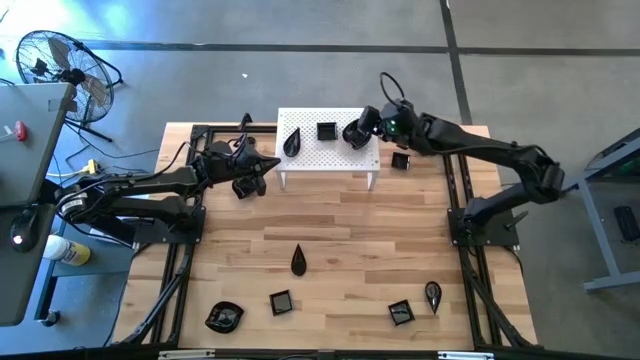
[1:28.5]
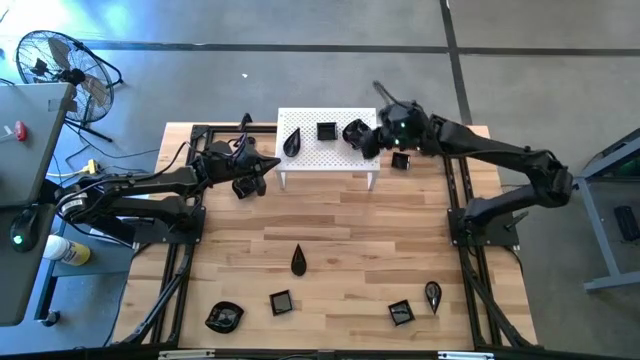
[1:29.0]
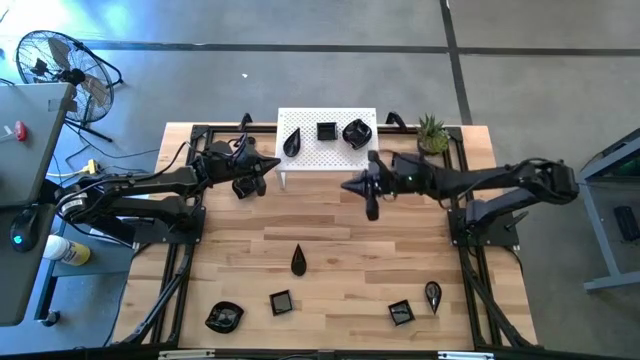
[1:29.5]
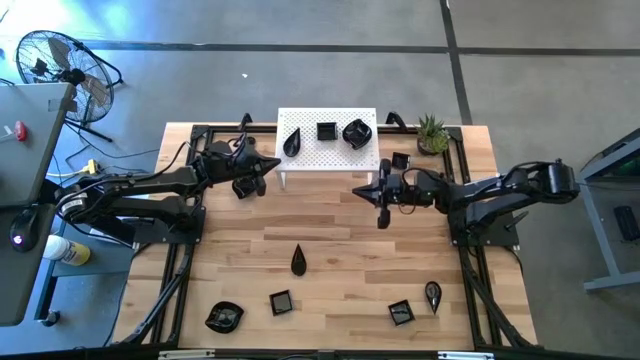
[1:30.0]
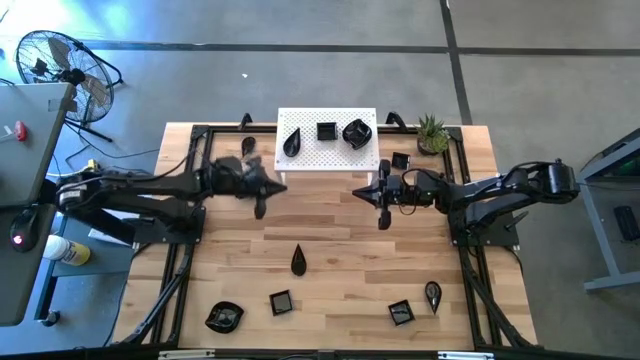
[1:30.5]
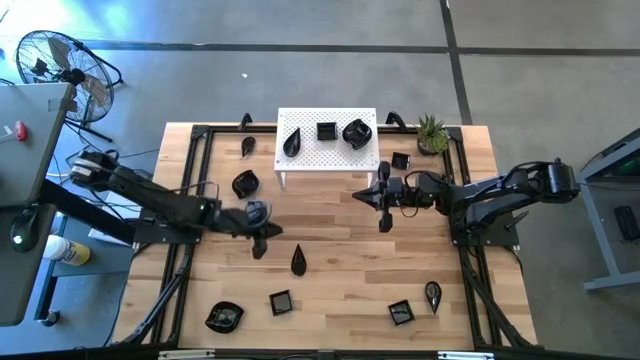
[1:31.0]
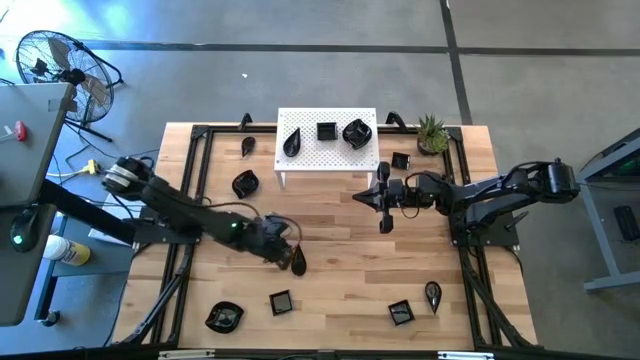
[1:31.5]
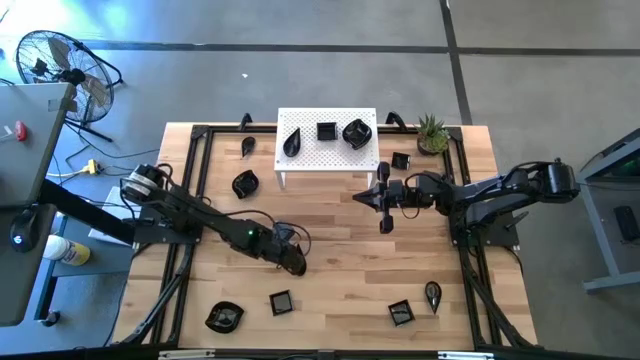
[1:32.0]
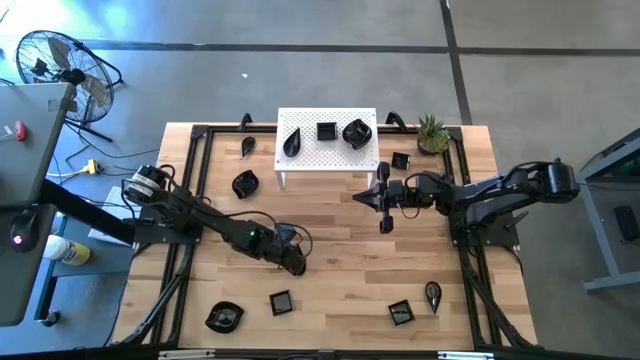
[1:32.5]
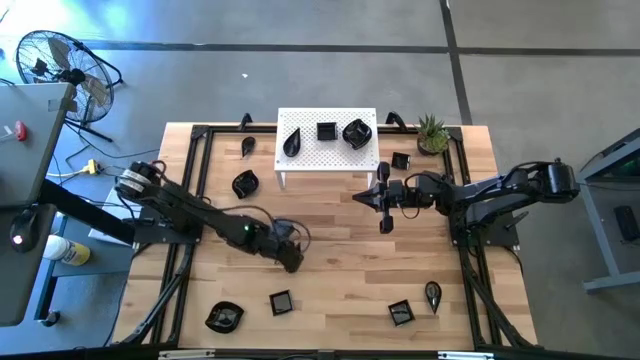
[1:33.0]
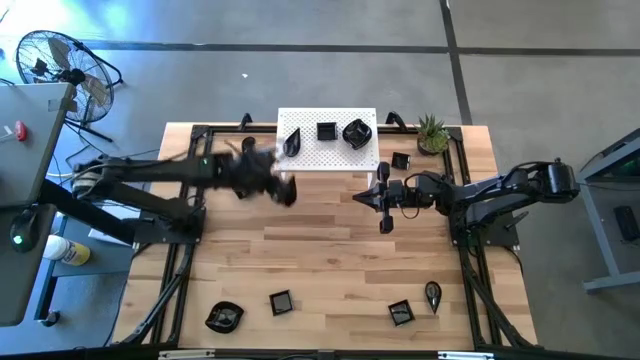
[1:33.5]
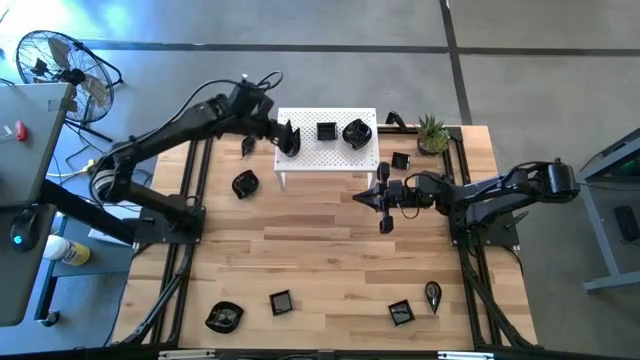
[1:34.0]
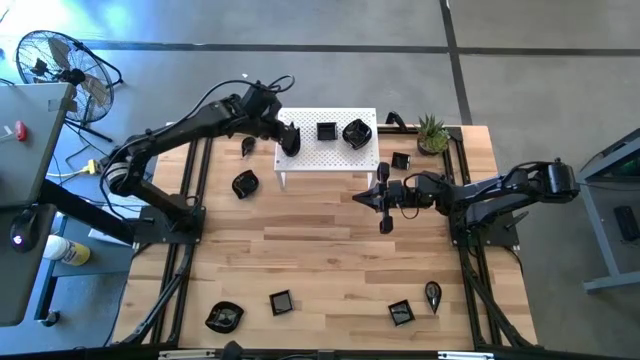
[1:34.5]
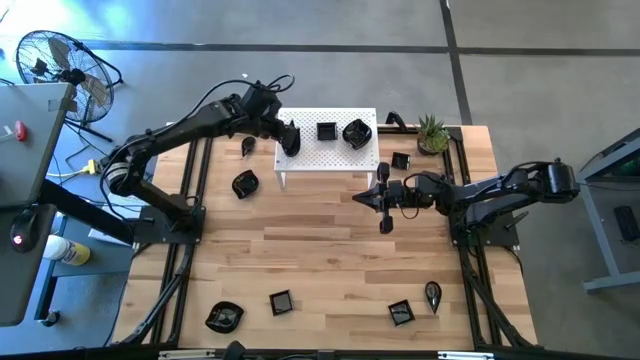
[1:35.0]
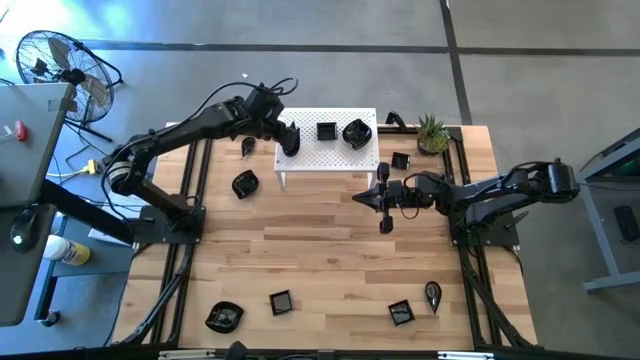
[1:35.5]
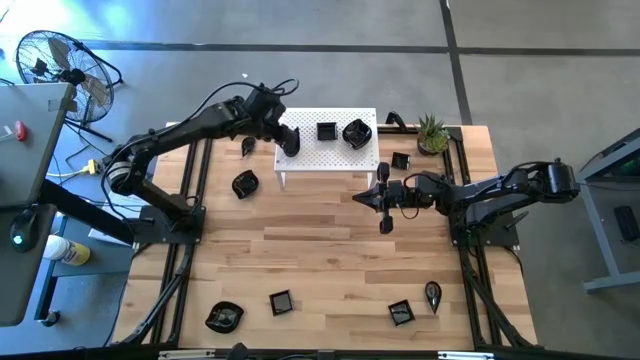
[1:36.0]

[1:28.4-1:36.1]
Task: Pick & Place Mini shaped plates
Stack the drop shaped bowl on top of the drop shaped bowls on the shelf

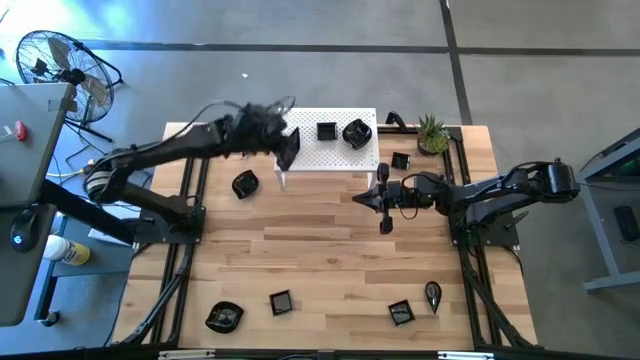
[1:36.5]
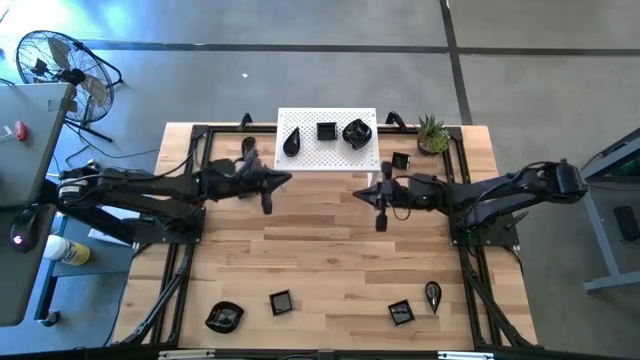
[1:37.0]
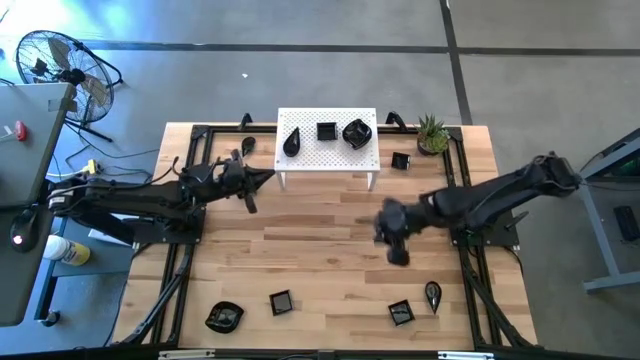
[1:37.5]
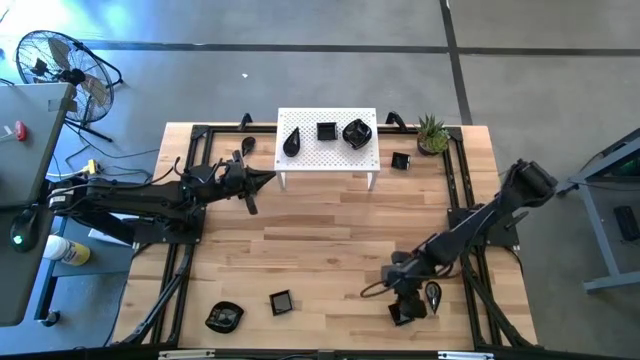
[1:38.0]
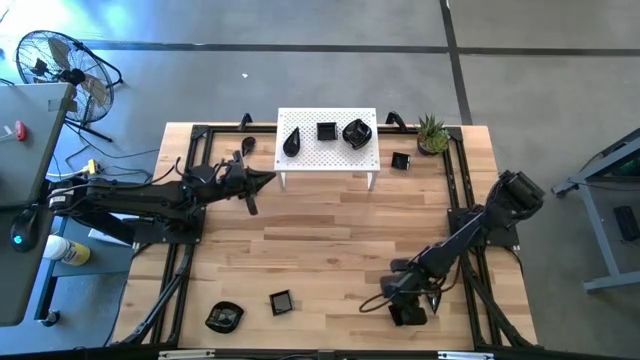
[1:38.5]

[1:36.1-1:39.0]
Stack the square bowl on top of the square bowls on the shelf

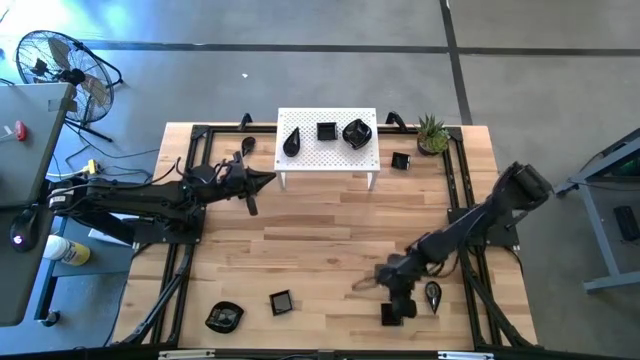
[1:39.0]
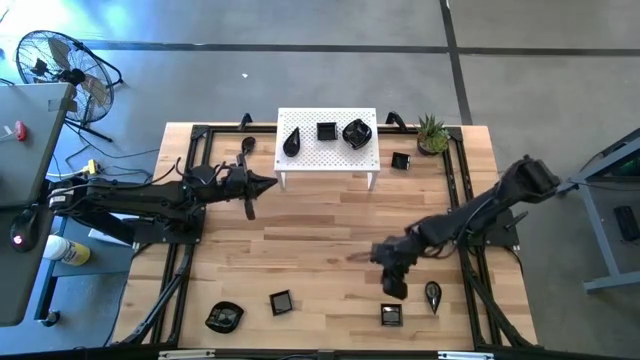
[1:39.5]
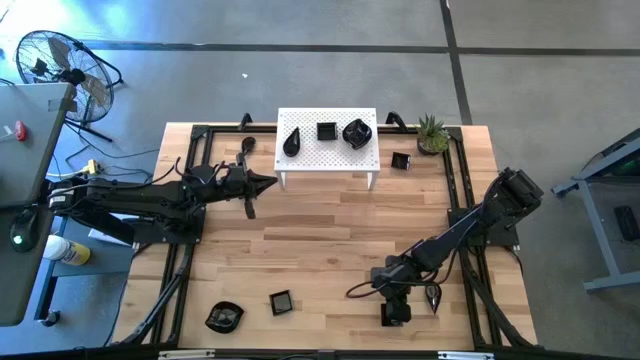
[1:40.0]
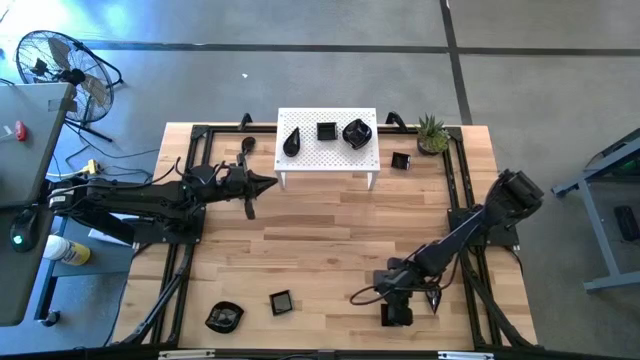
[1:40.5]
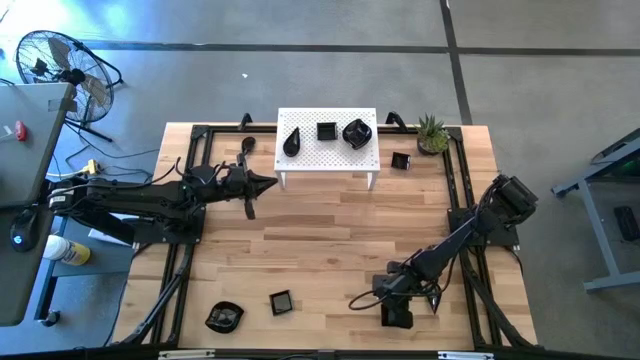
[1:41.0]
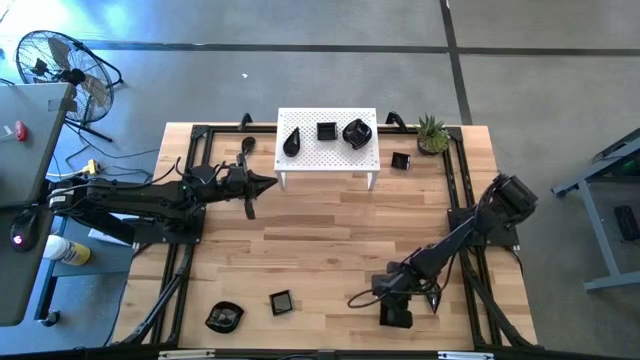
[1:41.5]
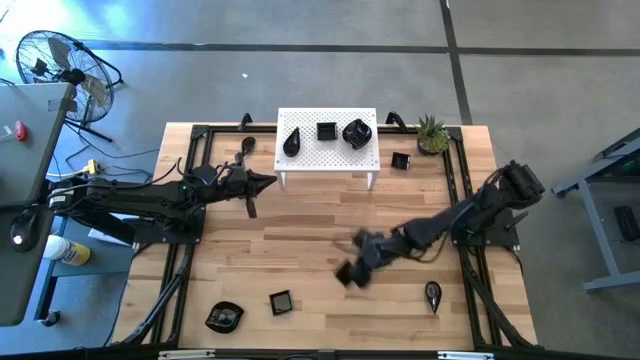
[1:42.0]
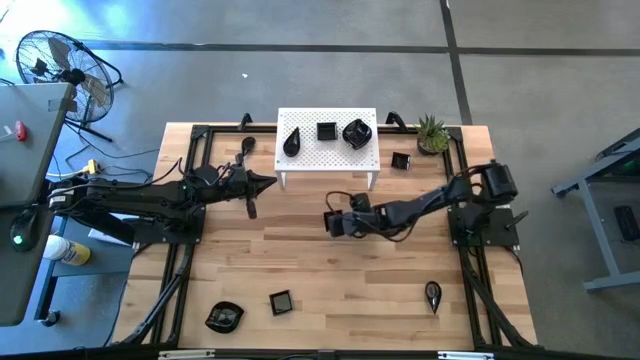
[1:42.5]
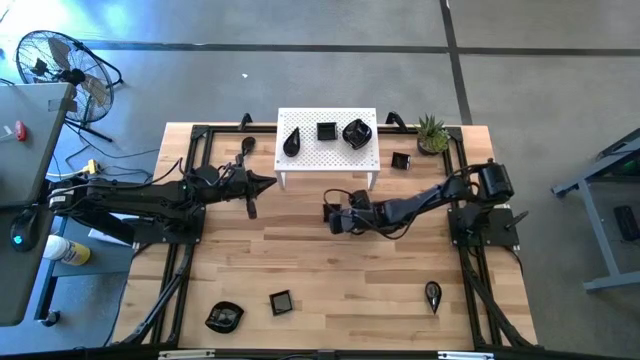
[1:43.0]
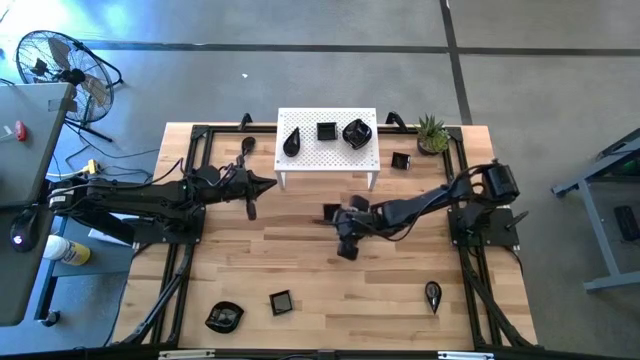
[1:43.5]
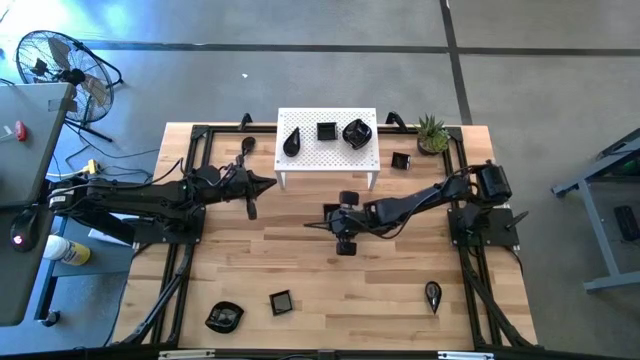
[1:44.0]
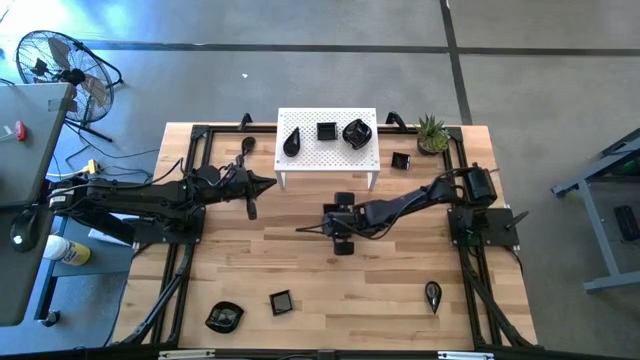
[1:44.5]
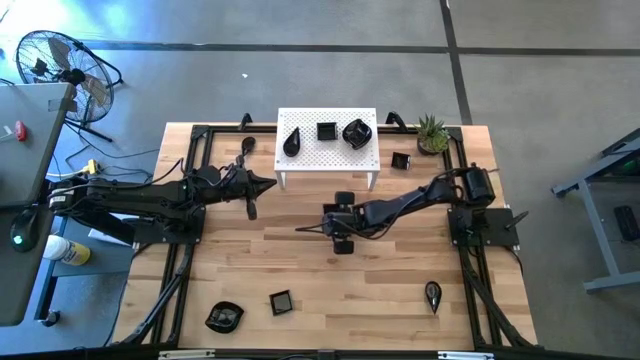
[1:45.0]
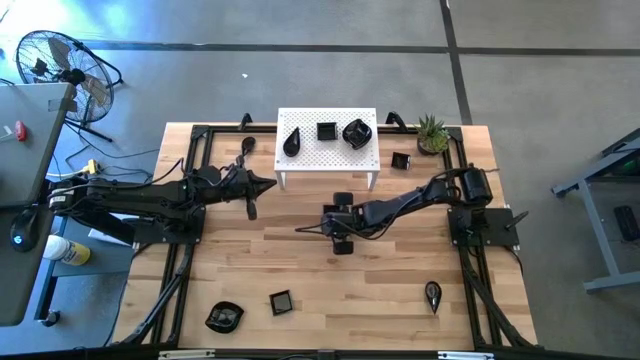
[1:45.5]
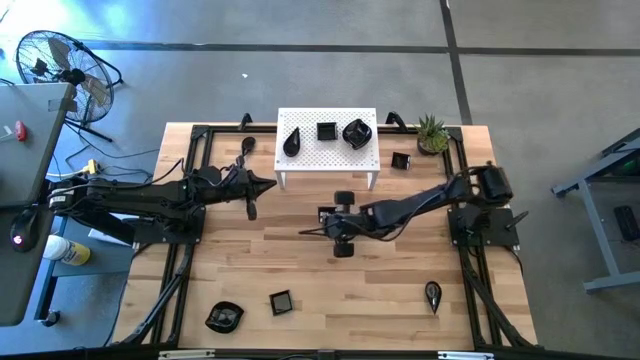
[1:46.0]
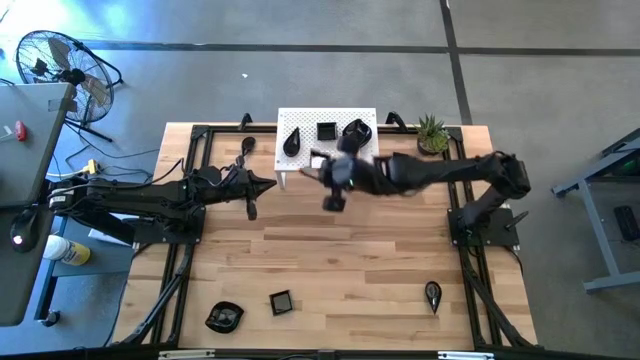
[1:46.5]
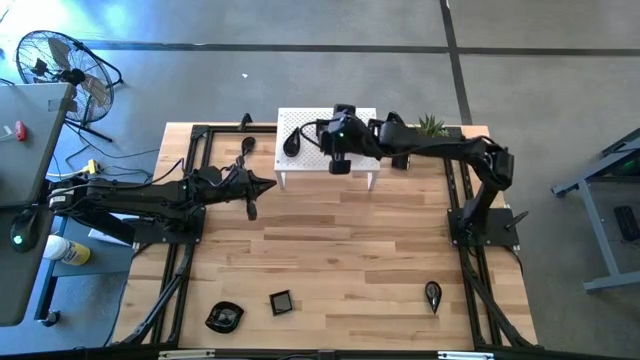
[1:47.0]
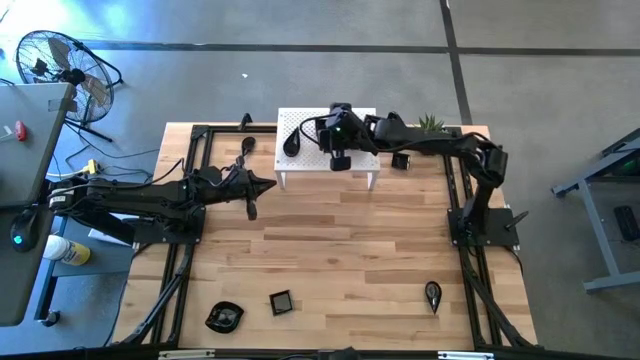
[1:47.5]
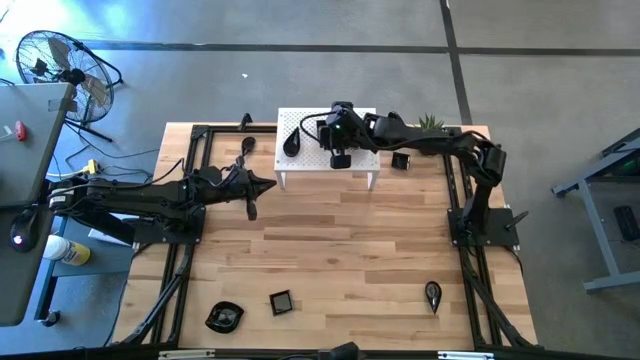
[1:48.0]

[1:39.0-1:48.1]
Stack the square bowl on top of the square bowls on the shelf

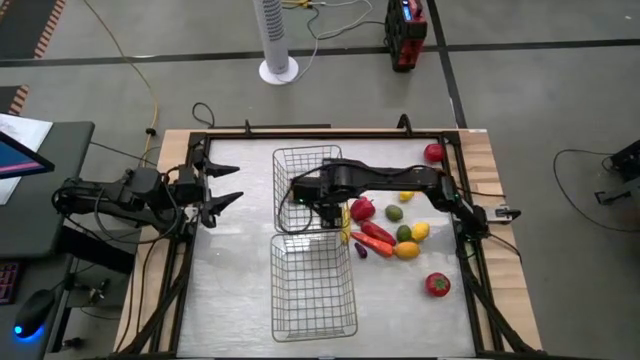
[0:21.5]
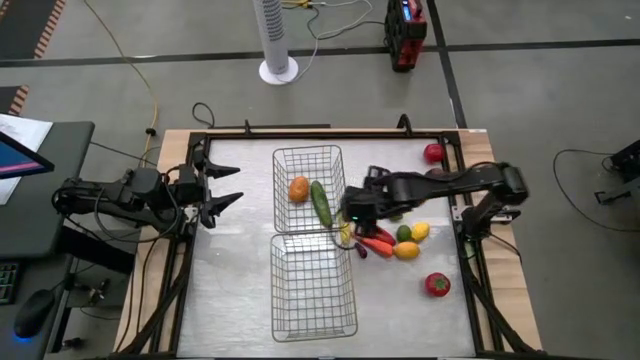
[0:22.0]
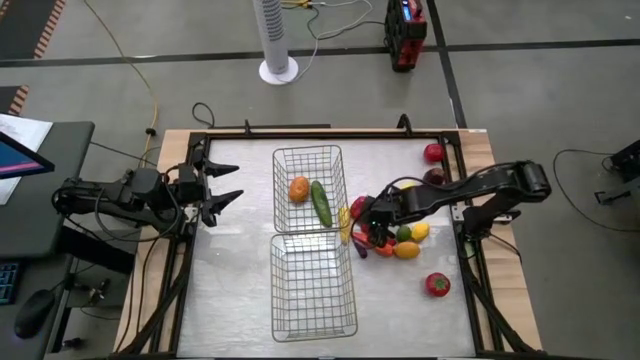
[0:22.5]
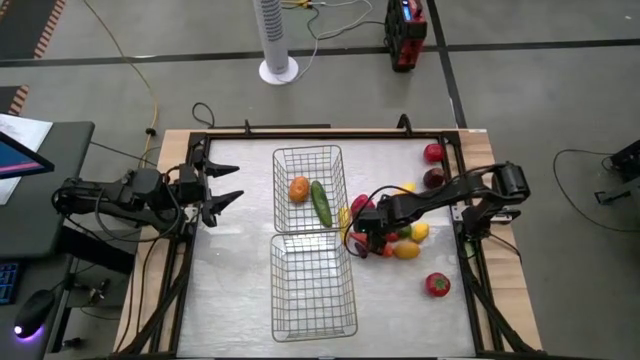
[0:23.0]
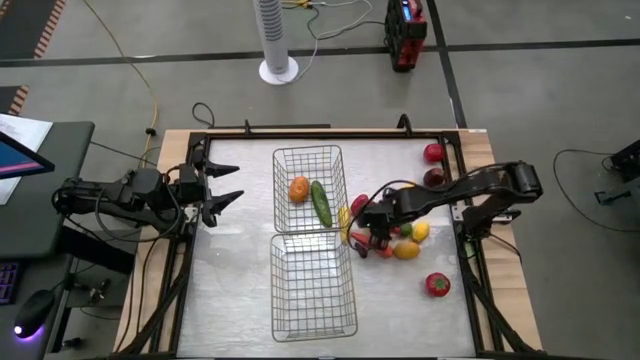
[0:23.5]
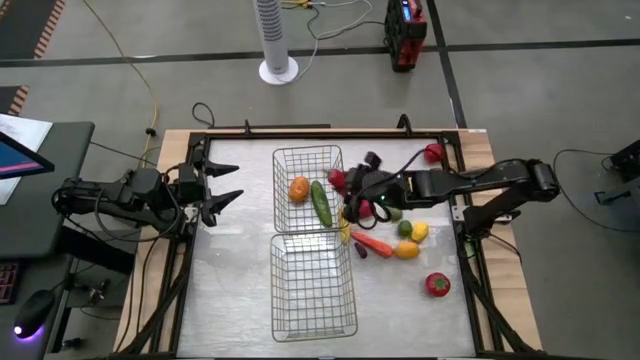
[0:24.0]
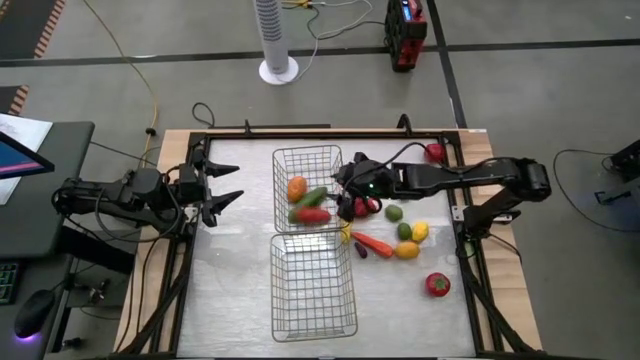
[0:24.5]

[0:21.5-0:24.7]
Task: Sort produce into baskets
Put the red chili into the top wire basket
